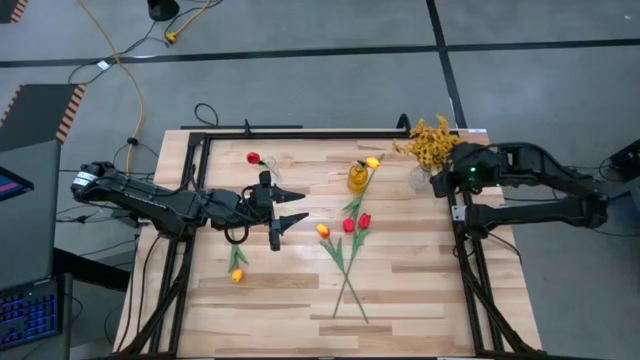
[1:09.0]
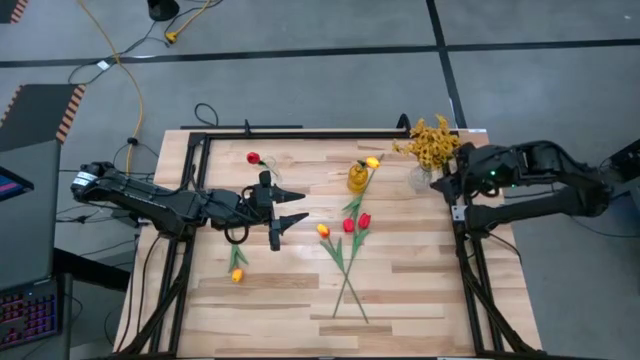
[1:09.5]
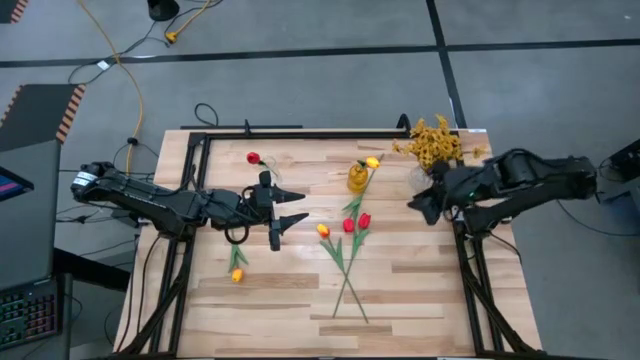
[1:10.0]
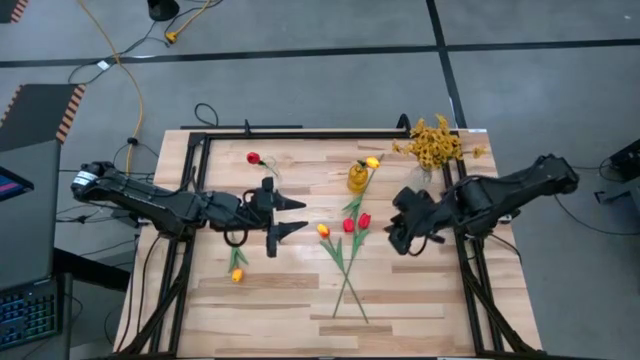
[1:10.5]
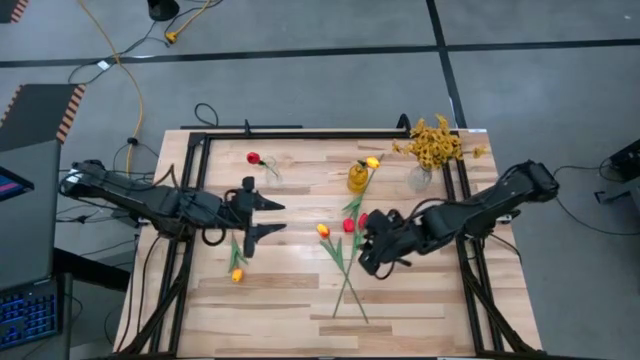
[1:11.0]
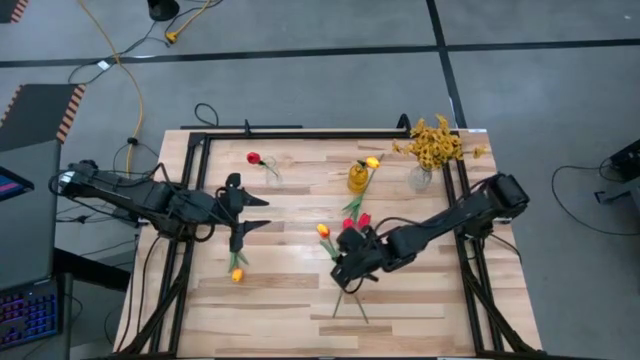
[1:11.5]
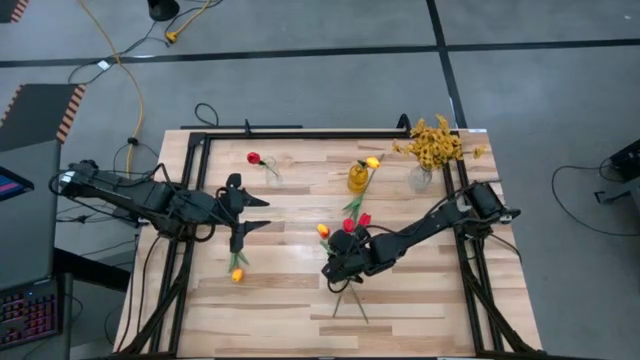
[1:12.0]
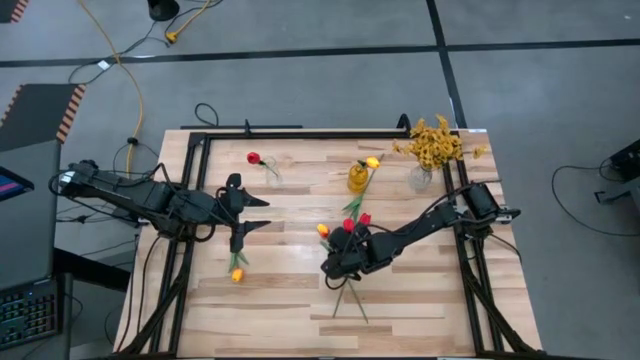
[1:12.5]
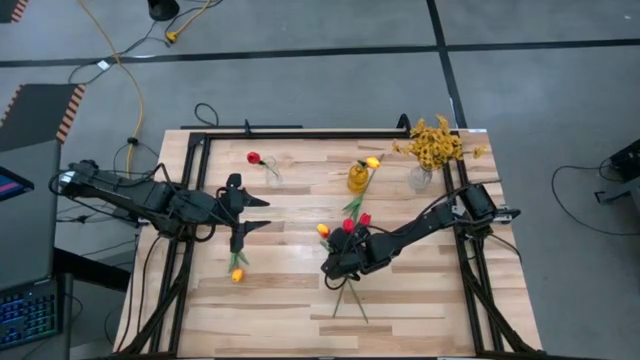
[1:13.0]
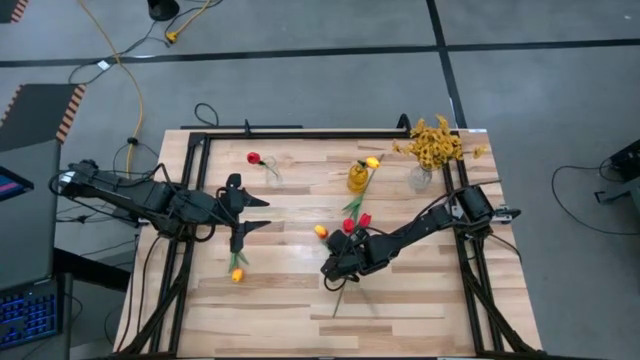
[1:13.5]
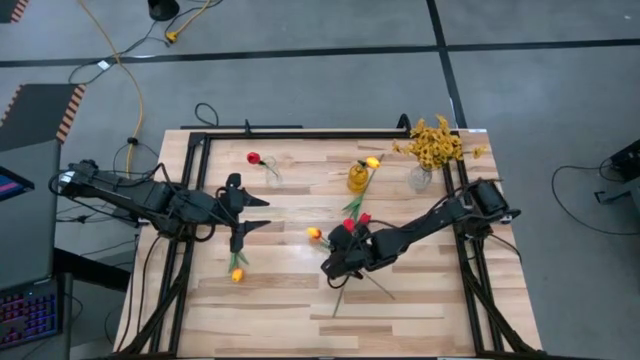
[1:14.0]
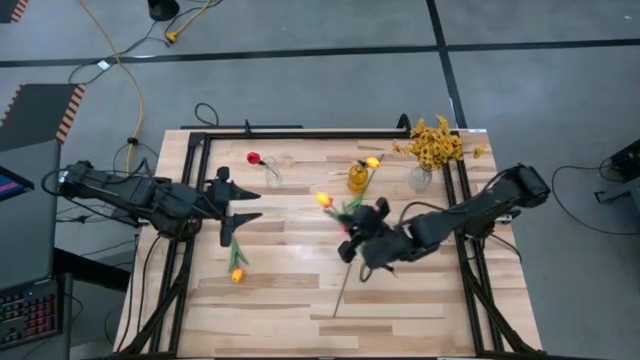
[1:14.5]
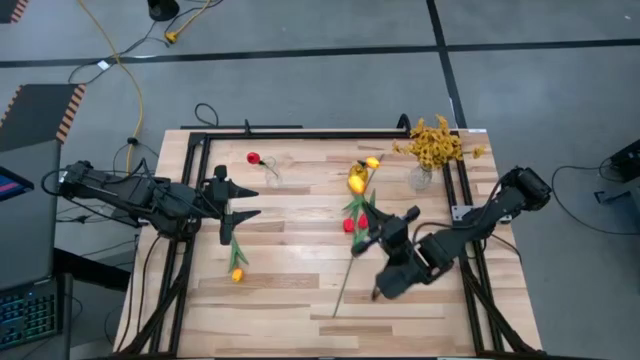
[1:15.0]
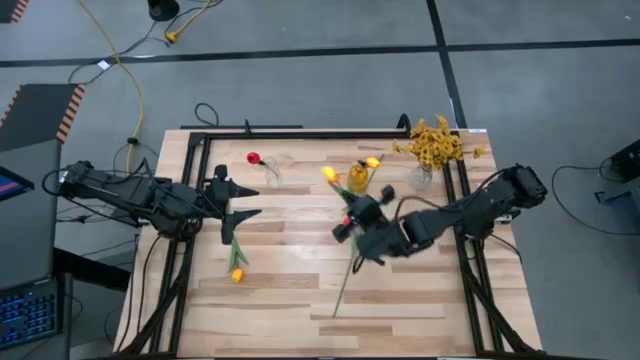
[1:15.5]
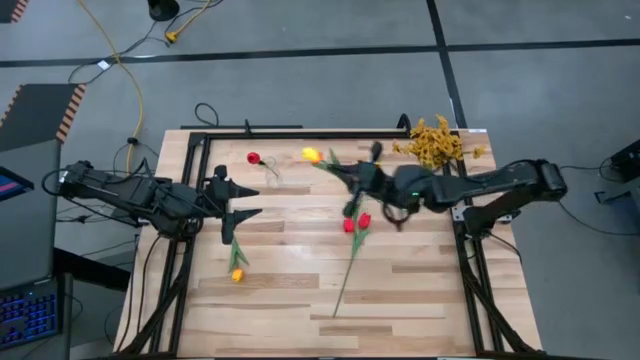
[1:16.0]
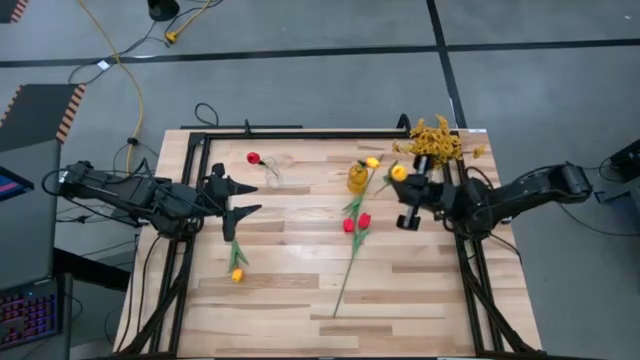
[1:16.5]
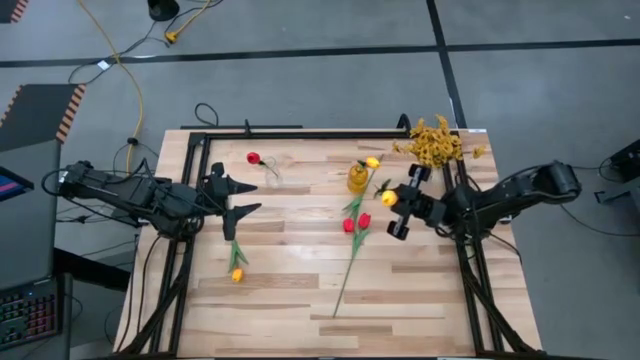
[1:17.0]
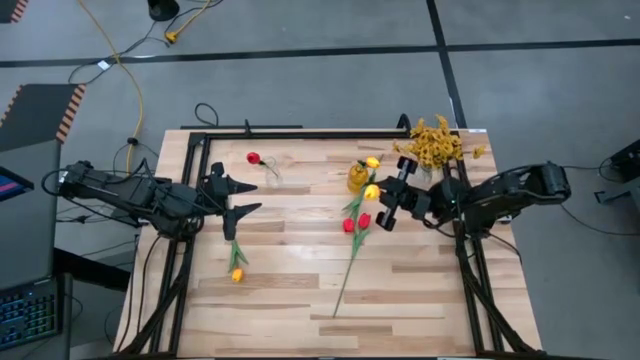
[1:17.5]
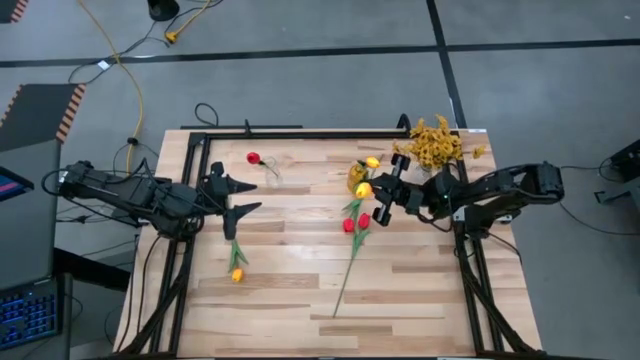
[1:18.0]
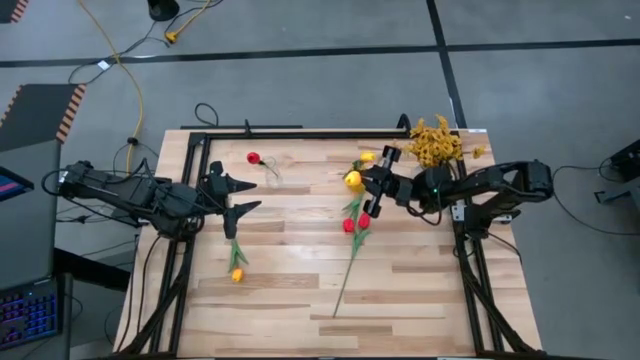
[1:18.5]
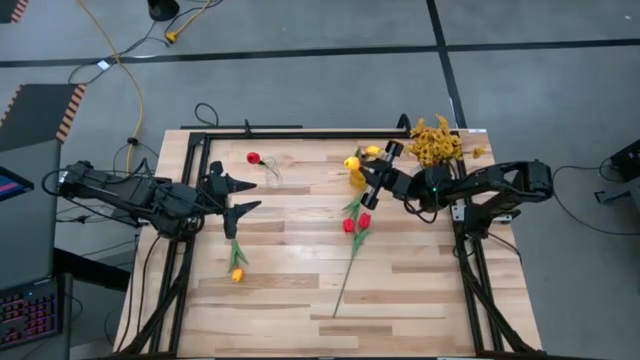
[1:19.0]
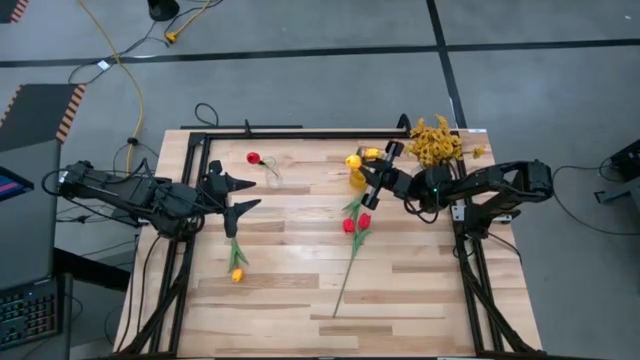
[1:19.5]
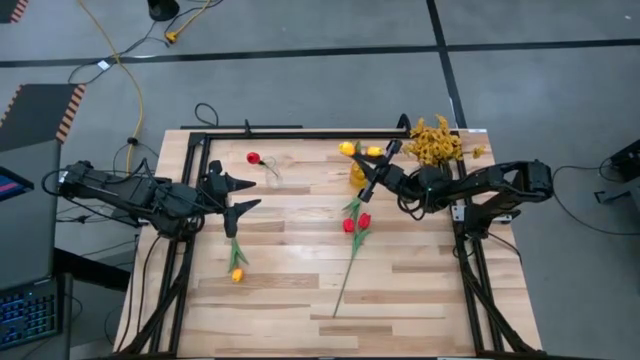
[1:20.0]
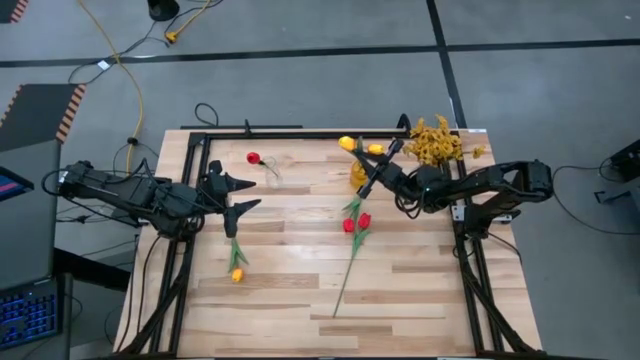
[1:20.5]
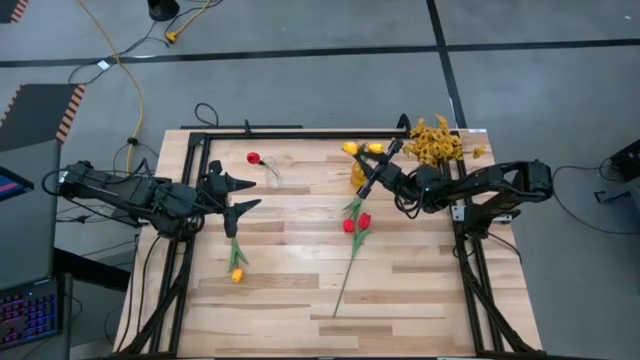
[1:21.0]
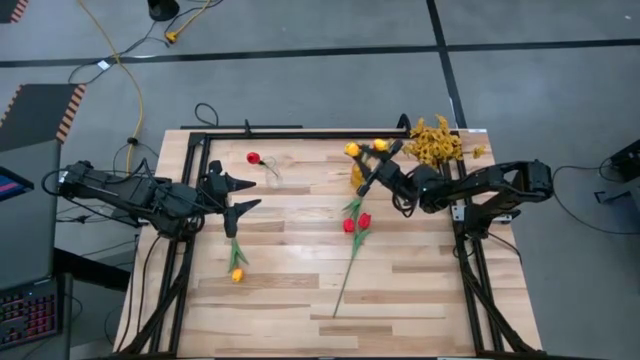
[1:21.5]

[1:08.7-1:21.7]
Task: Sort flowers into vase by color
Put the right yellow flower into the yellow flower vase

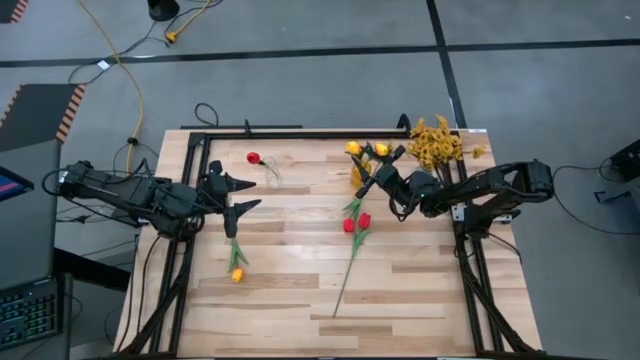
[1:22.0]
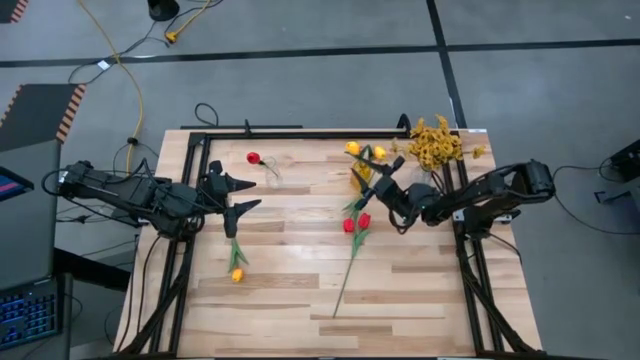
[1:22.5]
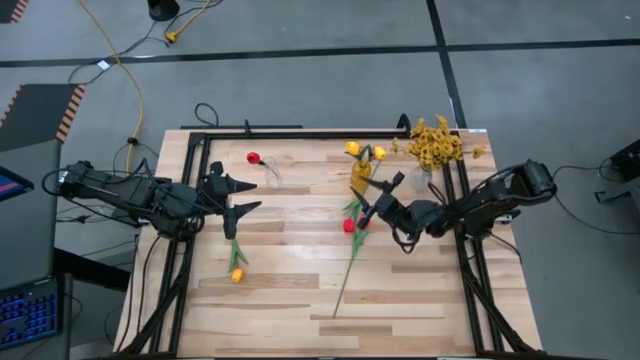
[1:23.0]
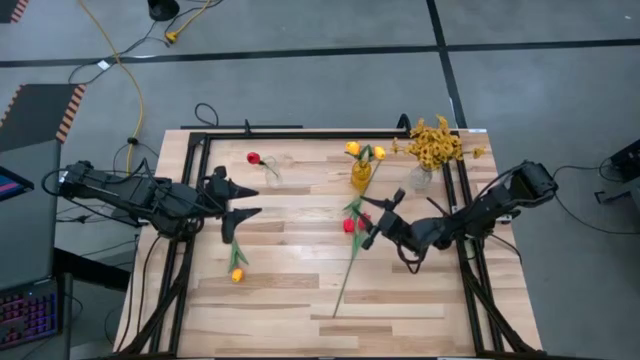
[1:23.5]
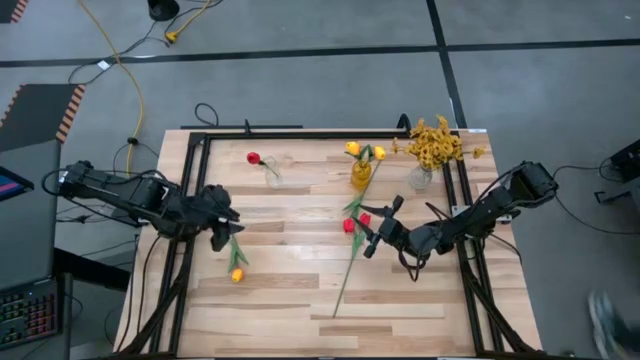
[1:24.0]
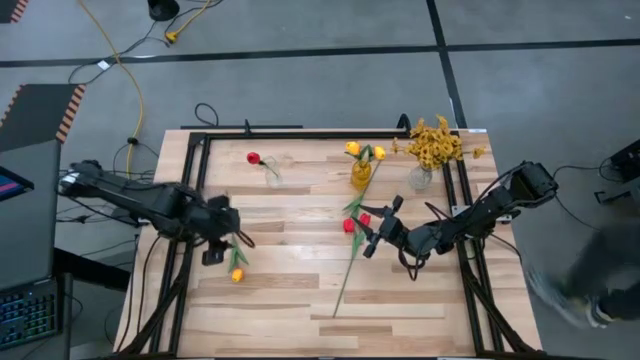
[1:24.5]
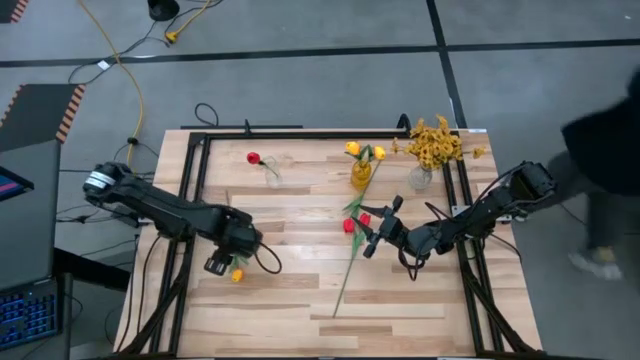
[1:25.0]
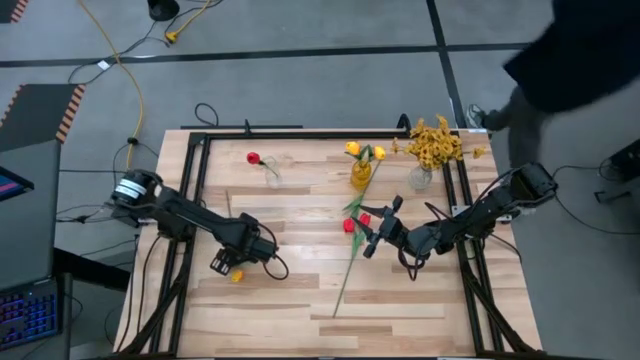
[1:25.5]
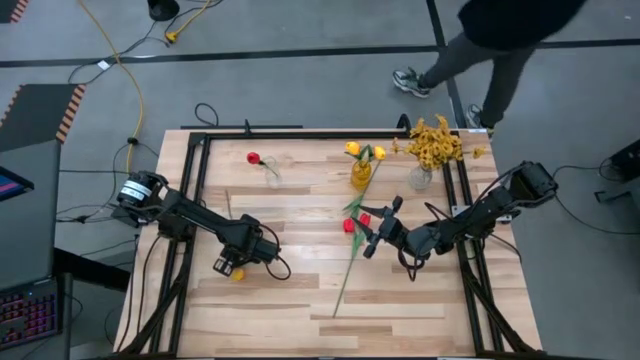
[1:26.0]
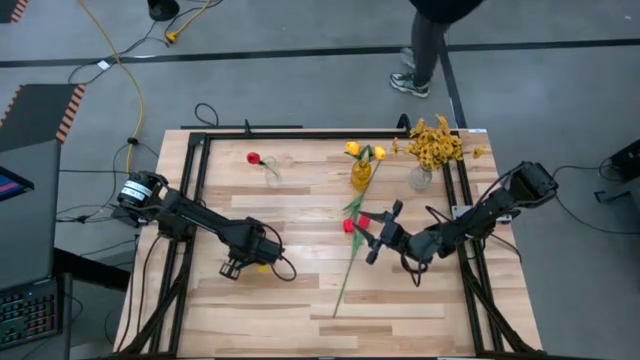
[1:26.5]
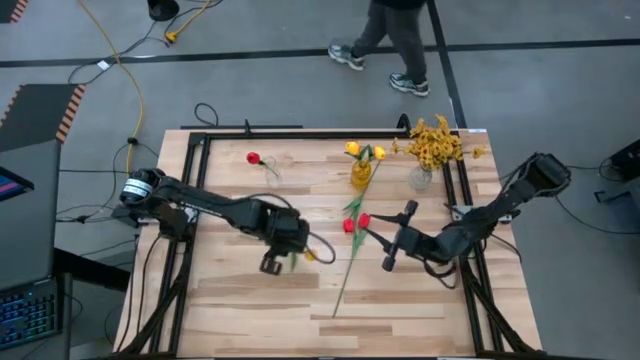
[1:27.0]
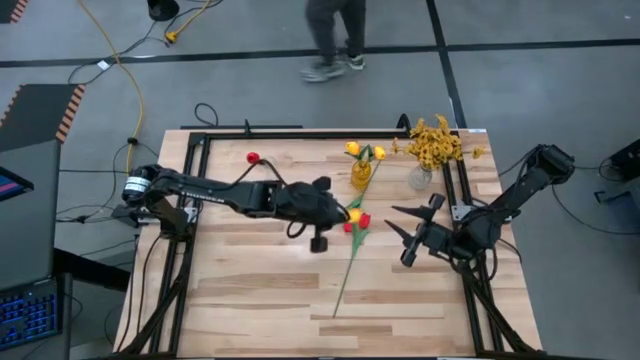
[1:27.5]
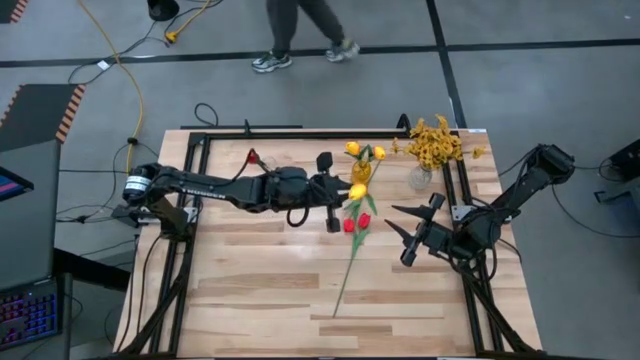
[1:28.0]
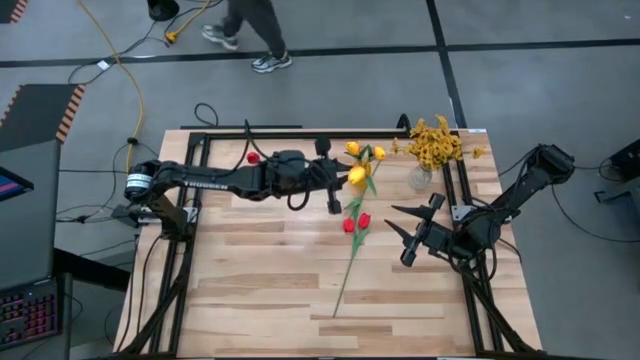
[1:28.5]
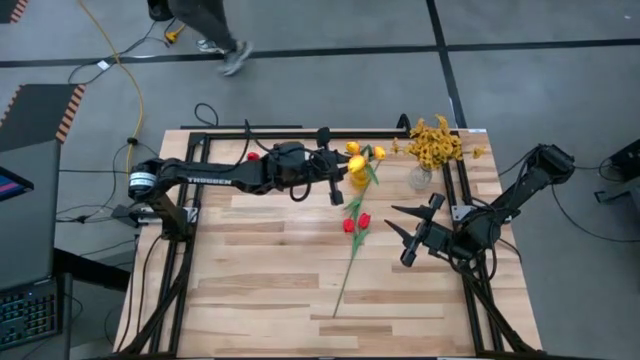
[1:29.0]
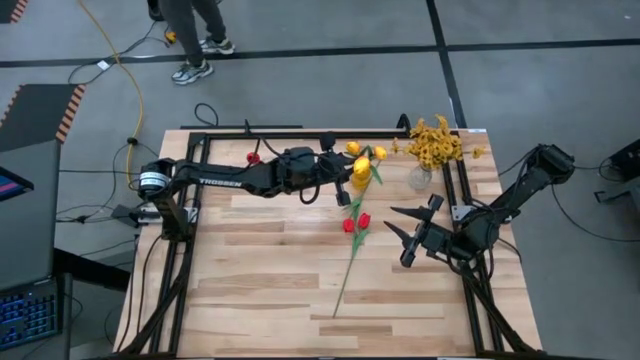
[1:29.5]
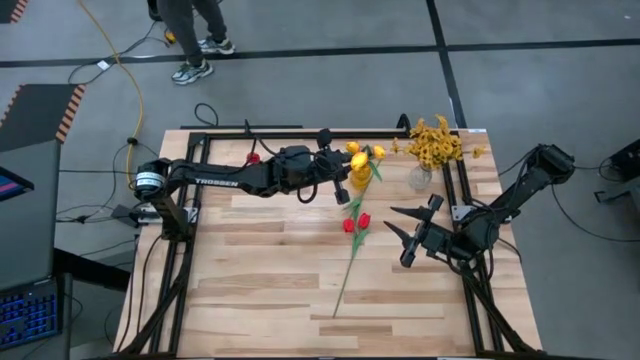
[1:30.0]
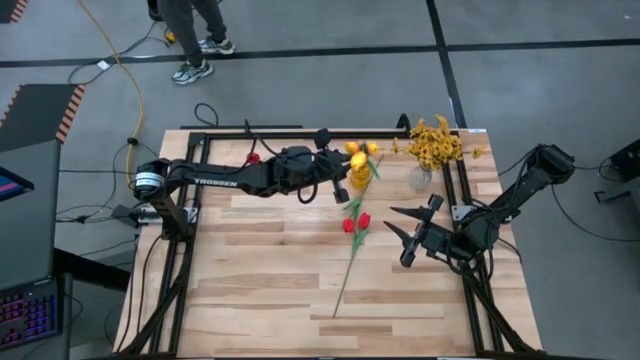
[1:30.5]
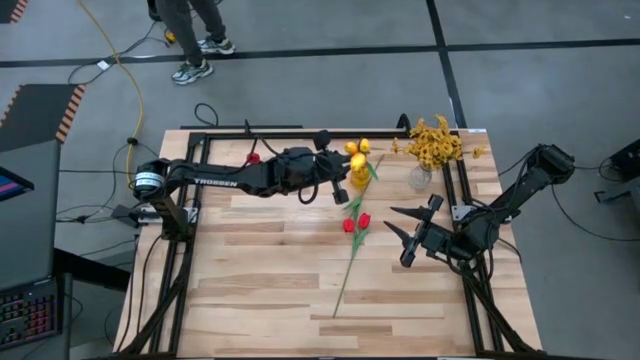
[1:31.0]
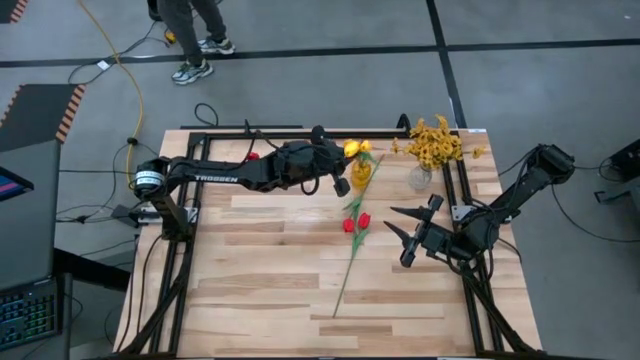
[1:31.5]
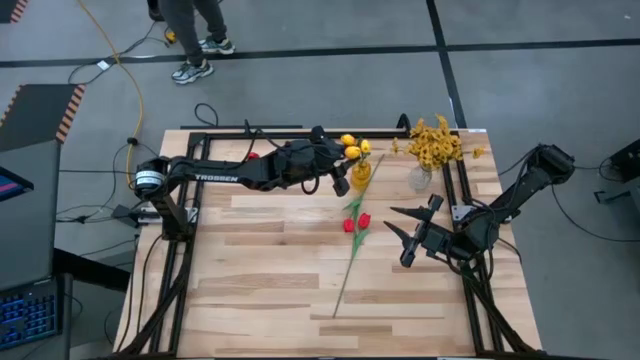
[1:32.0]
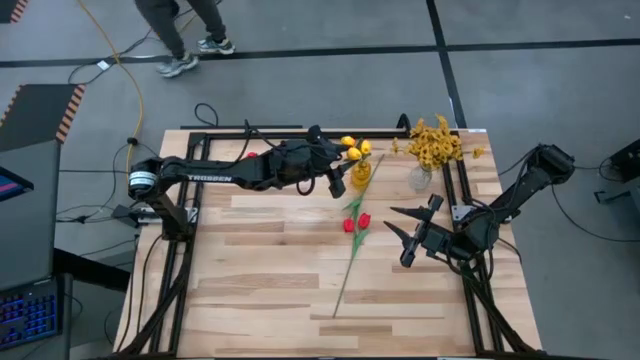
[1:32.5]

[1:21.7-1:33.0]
Put the yellow flower into the yellow flower vase
